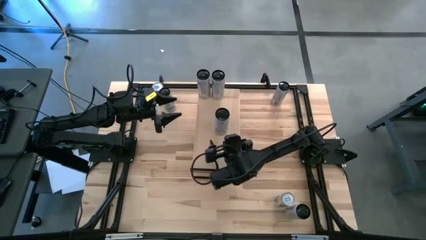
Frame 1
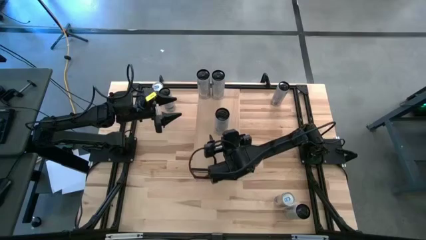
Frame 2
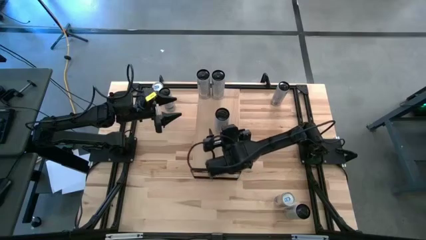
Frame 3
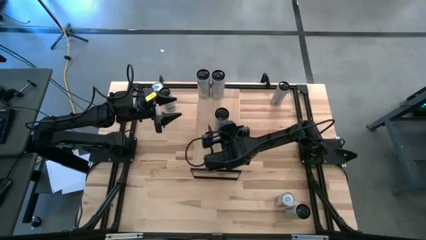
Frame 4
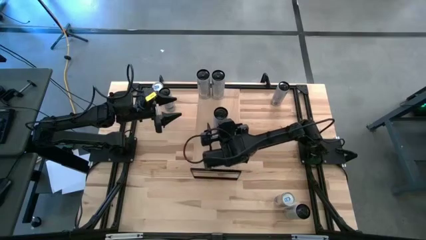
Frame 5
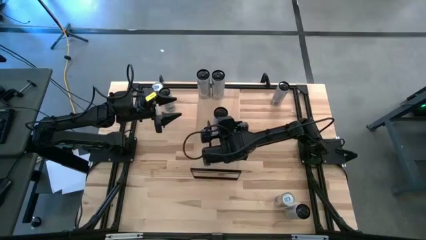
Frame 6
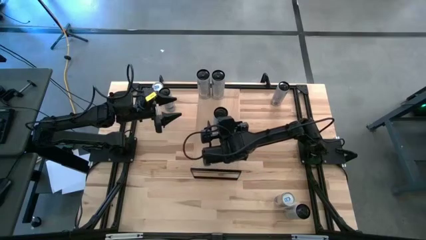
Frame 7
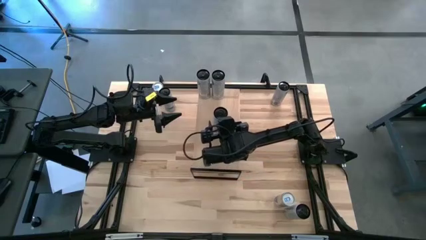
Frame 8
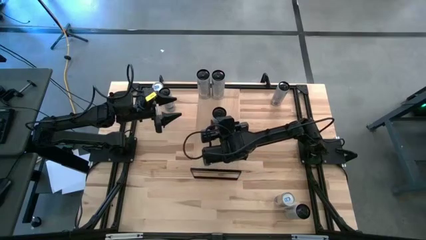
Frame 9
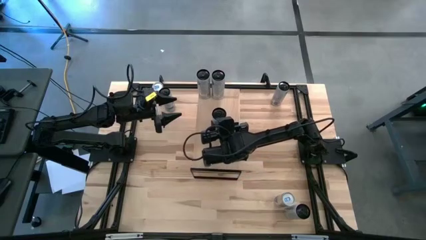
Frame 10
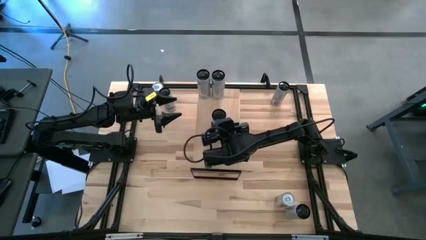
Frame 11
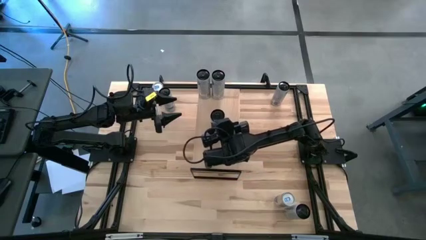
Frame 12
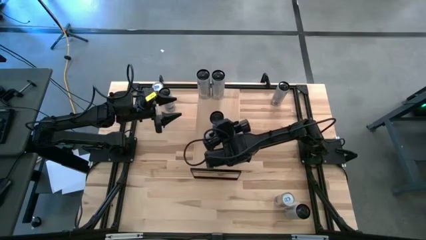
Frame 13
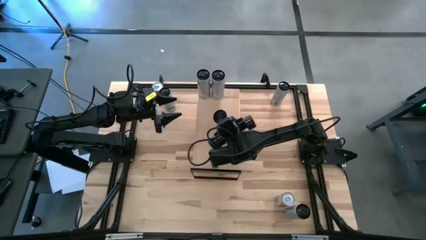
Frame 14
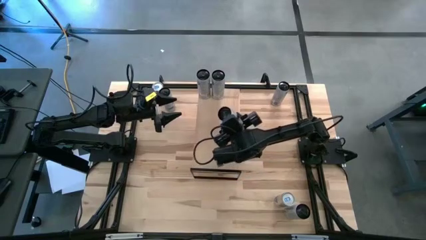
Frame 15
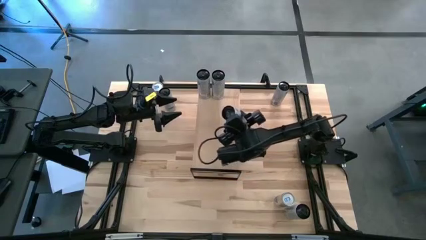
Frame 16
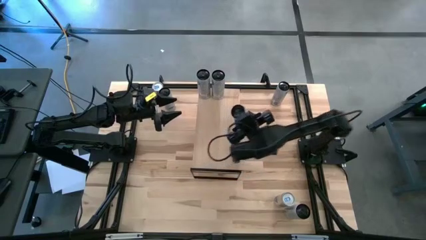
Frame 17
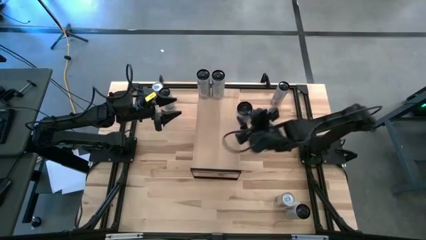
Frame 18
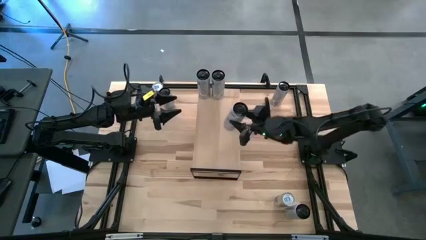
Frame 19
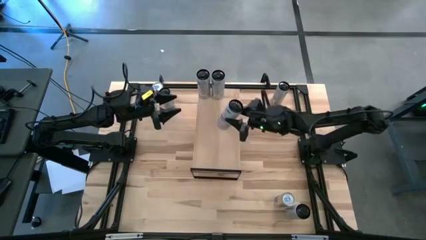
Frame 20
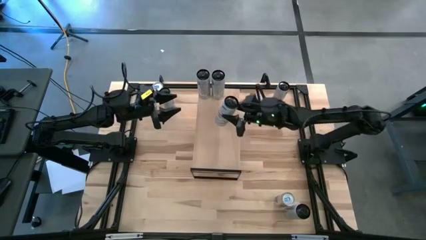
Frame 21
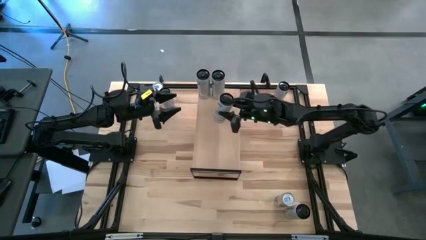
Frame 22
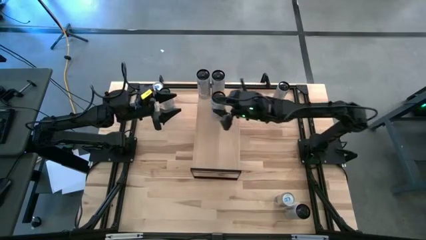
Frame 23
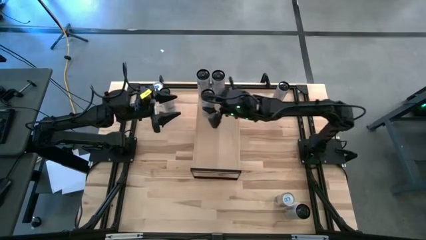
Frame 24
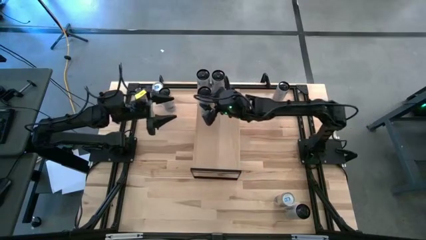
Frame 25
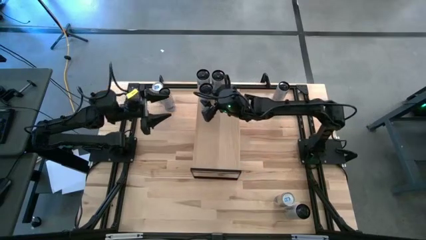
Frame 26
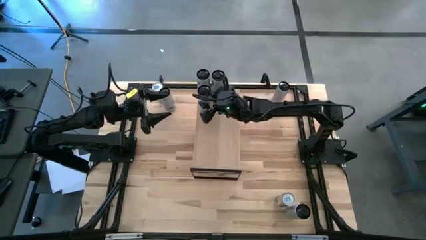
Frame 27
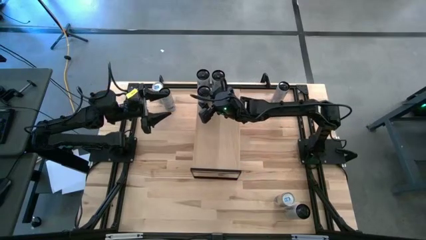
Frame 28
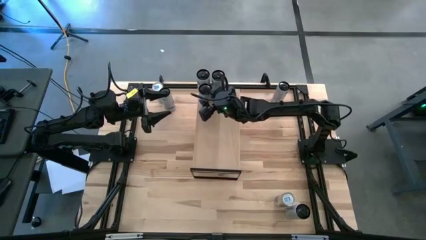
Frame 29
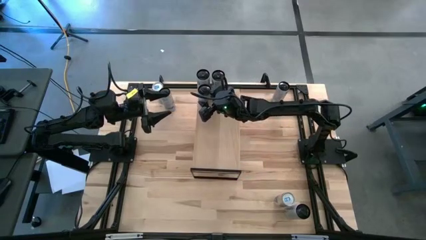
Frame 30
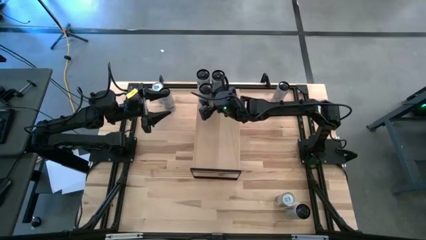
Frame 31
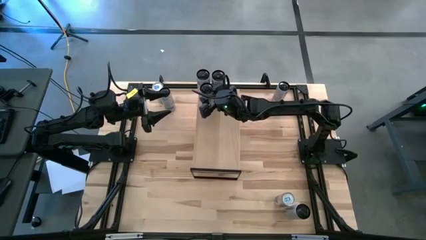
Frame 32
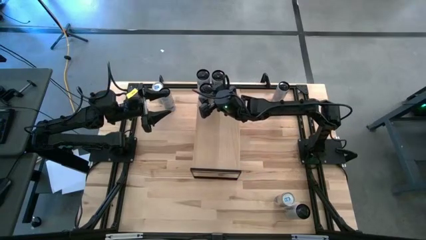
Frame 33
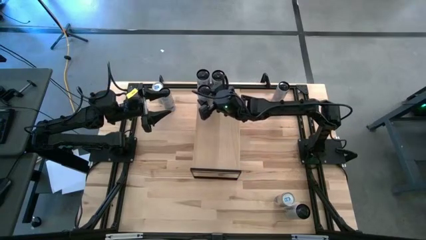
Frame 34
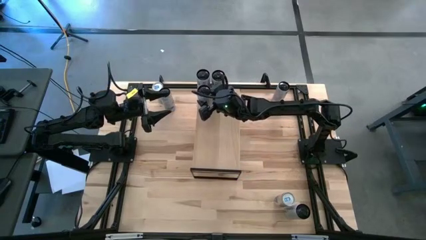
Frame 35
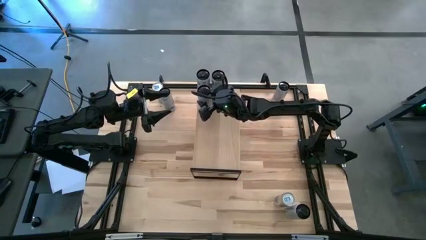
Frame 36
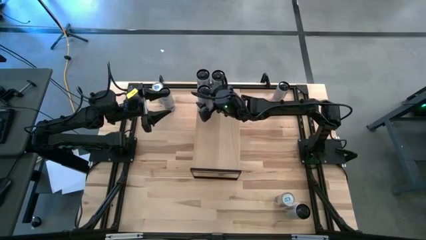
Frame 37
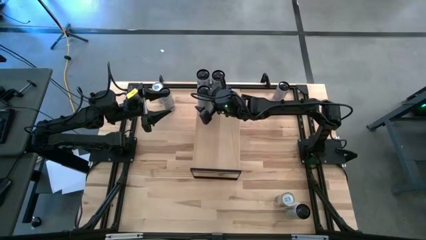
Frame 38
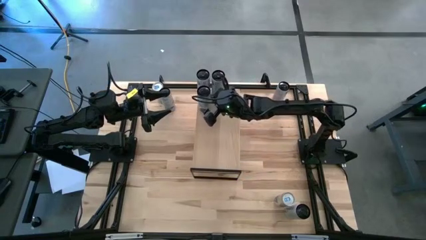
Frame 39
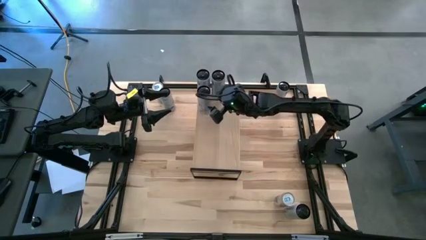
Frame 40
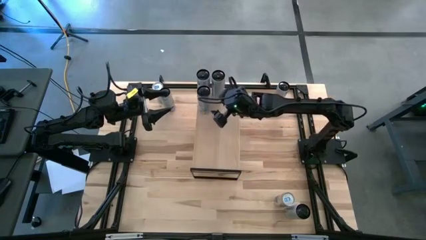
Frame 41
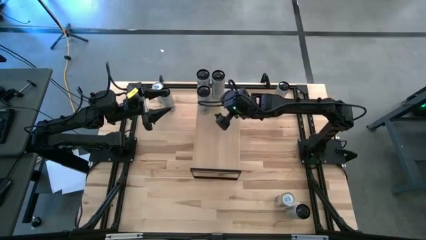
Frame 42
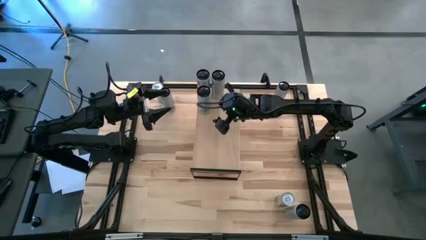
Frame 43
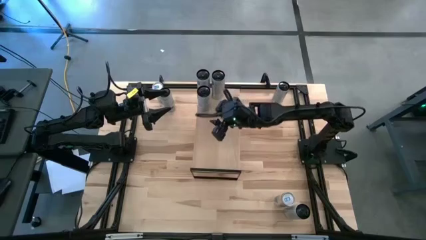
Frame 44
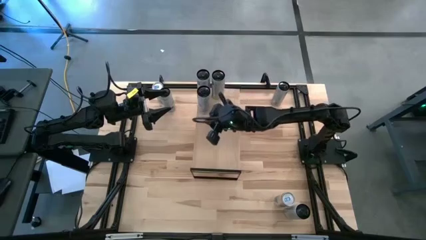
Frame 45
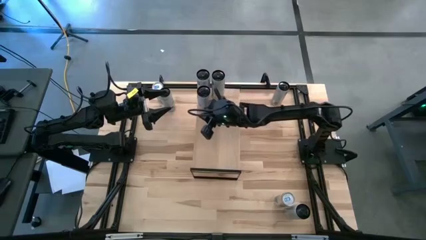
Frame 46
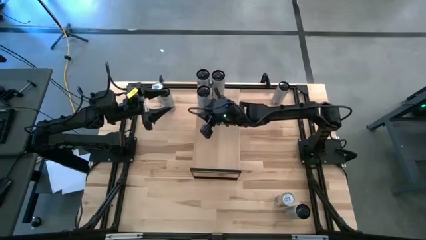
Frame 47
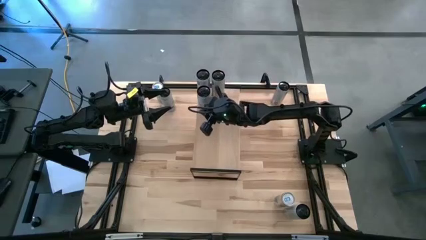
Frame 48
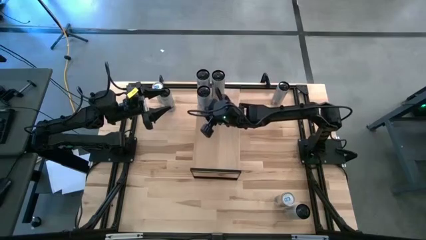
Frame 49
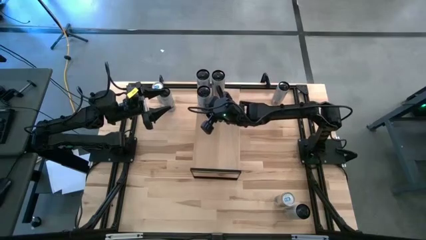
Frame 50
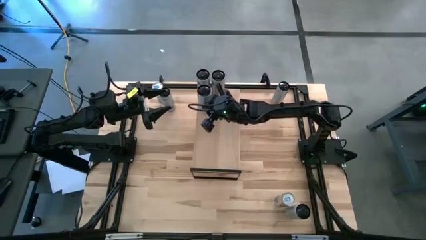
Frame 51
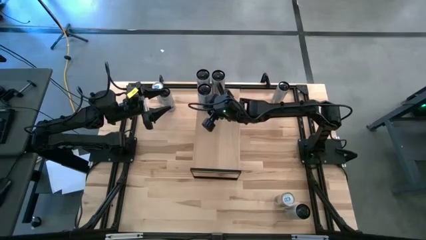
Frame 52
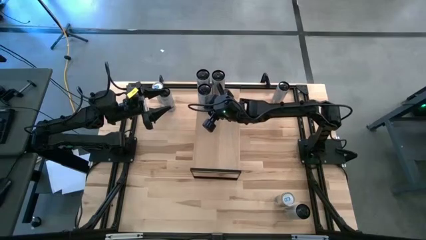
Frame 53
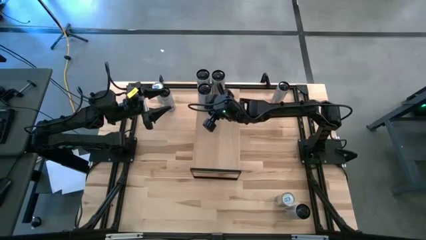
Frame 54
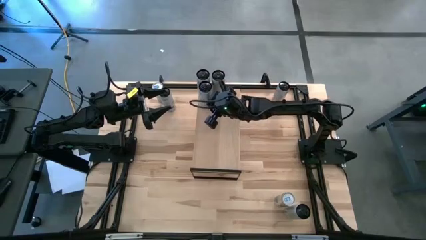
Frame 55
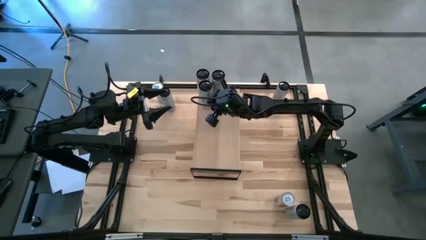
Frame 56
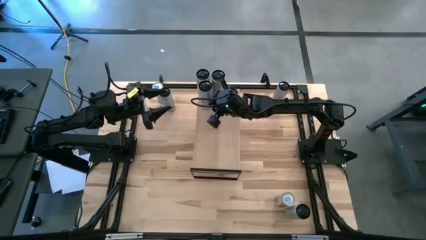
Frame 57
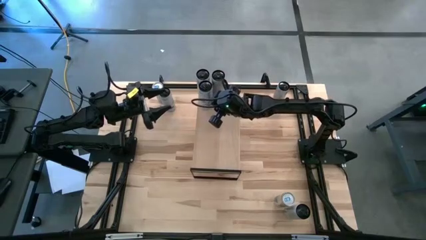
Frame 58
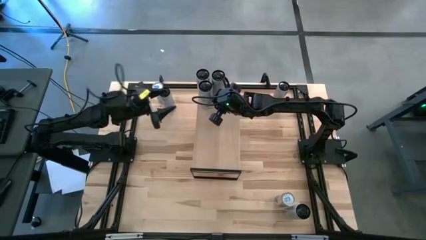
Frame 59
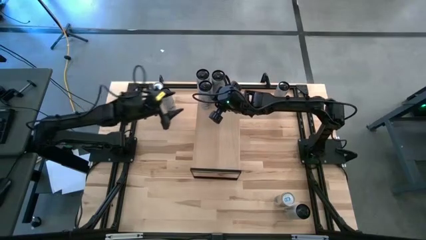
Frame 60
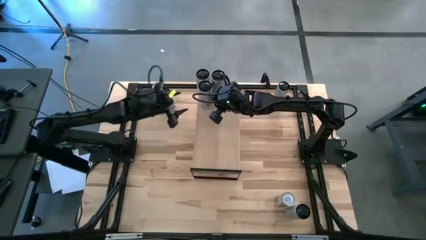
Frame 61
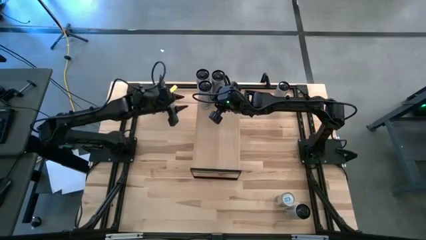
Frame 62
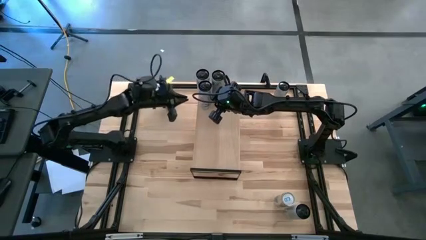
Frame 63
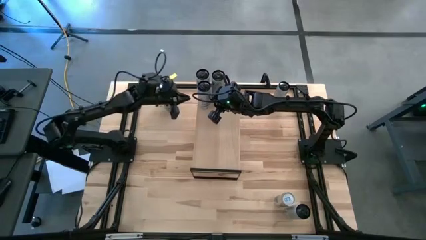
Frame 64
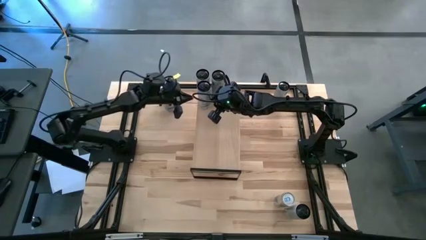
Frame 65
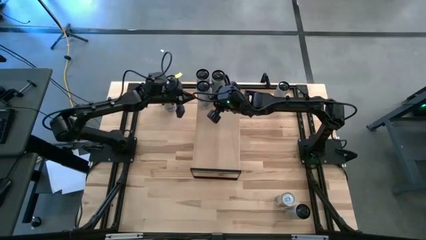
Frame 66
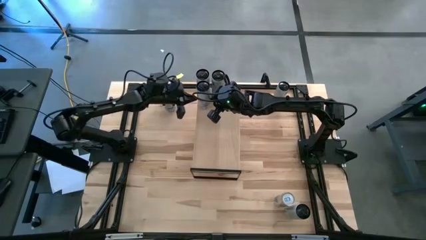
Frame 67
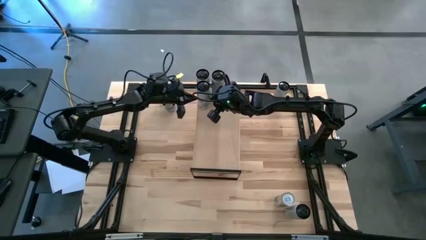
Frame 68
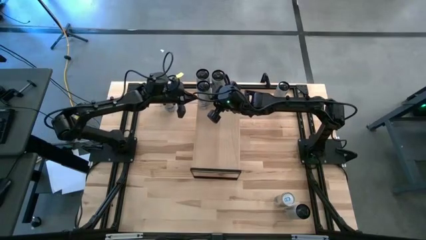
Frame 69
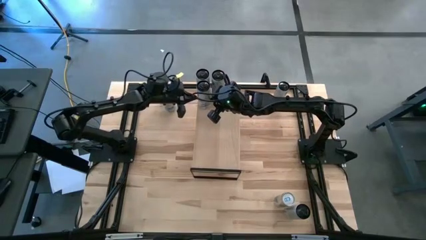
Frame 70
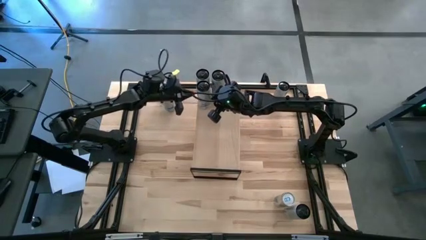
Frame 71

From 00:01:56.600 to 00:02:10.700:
Task: Place canned beverage on shelf
Put the bottom white blue soda can on the shelf

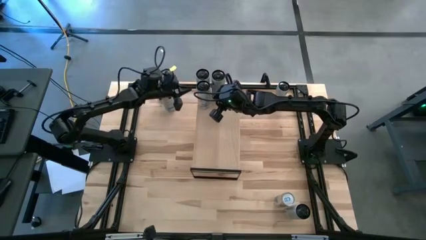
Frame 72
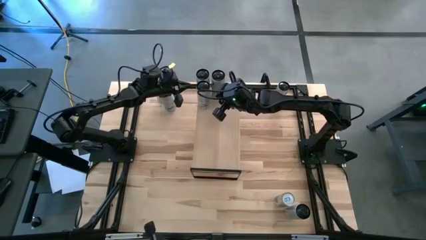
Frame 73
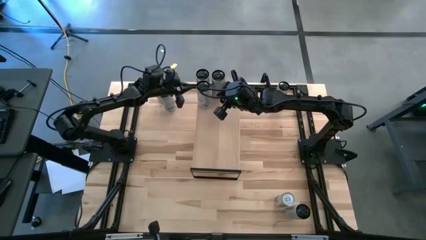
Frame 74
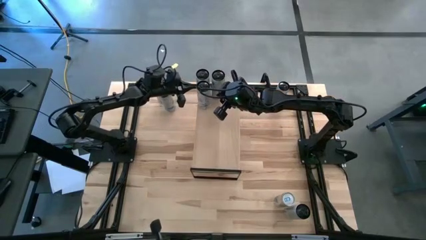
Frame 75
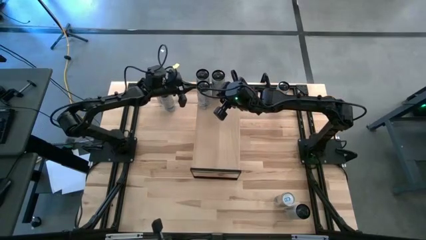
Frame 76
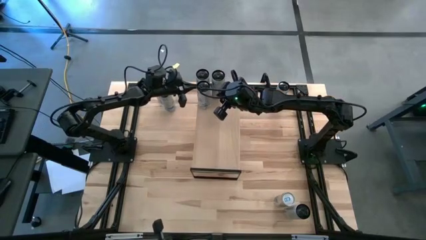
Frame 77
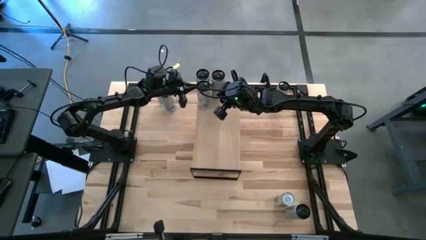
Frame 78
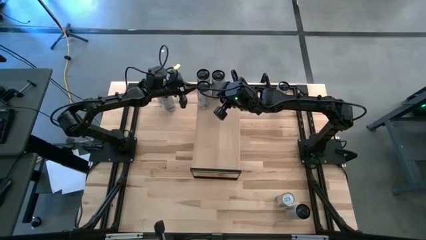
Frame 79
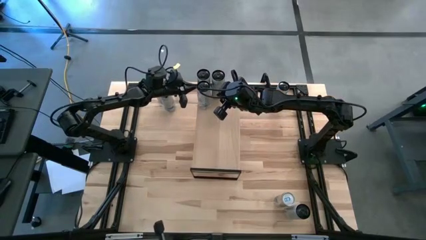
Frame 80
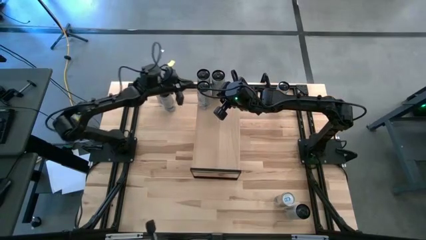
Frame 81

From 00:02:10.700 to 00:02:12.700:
Adjust the white pink soda can
